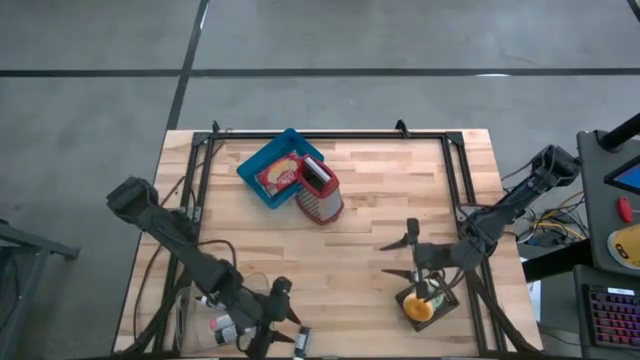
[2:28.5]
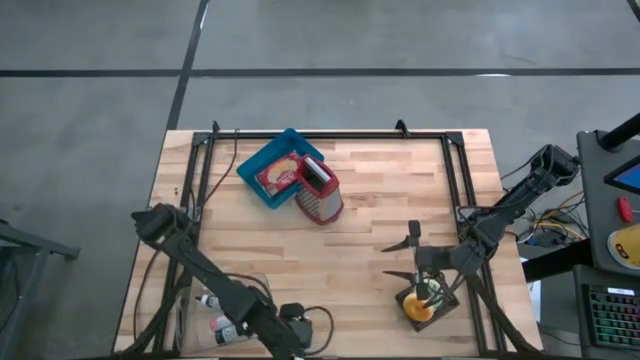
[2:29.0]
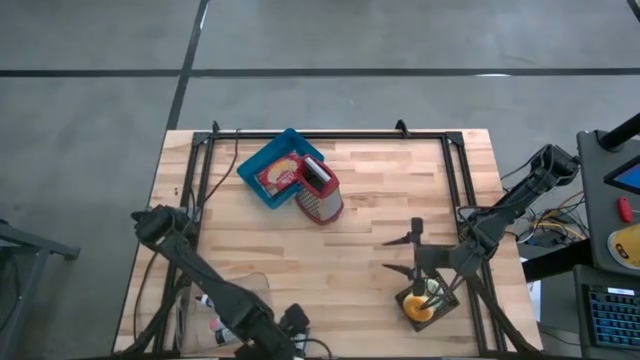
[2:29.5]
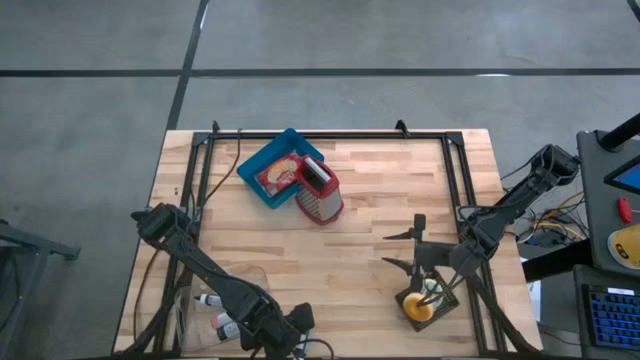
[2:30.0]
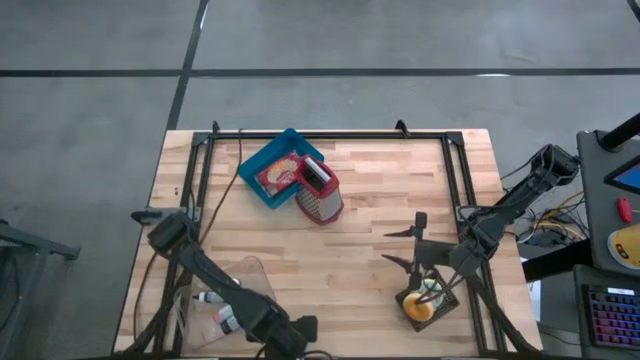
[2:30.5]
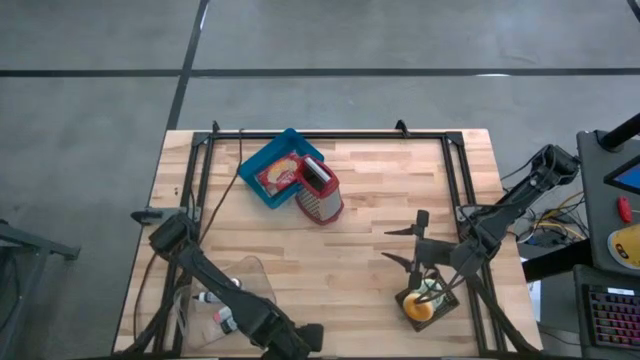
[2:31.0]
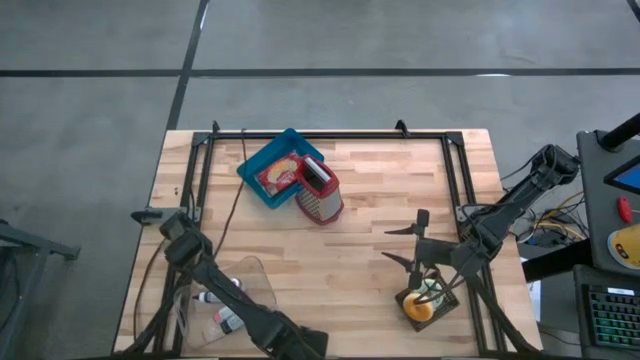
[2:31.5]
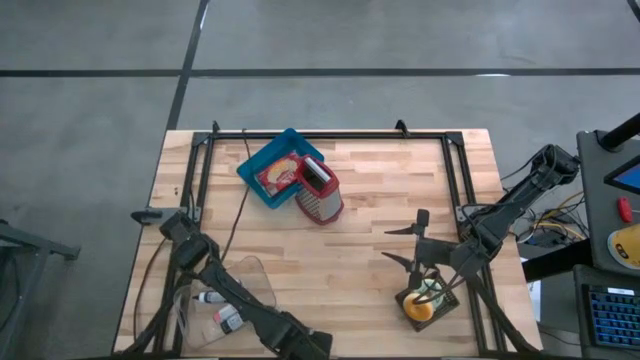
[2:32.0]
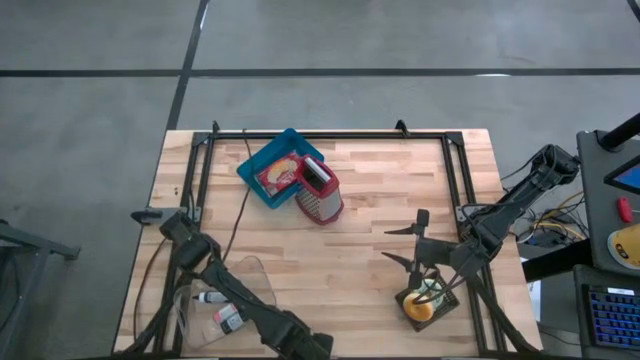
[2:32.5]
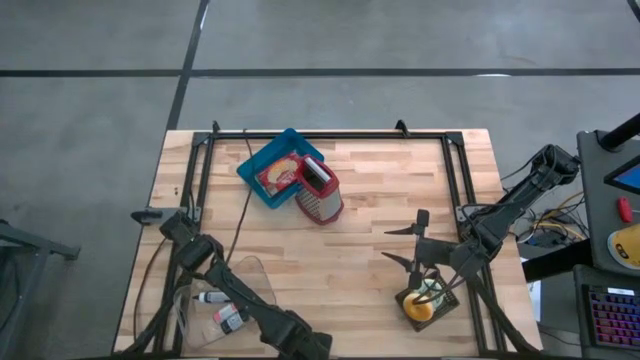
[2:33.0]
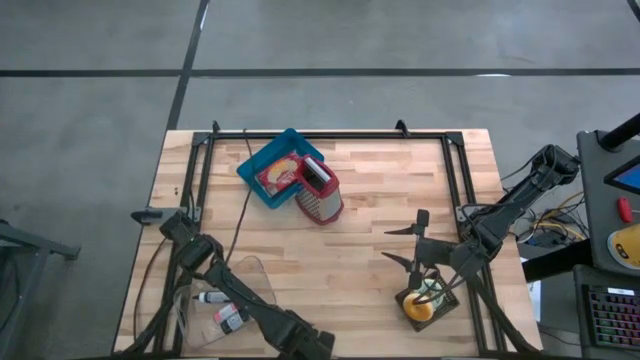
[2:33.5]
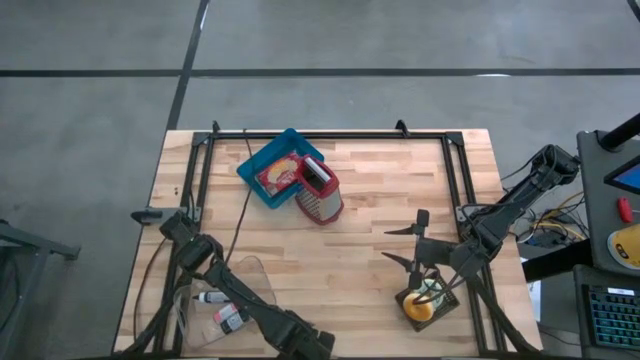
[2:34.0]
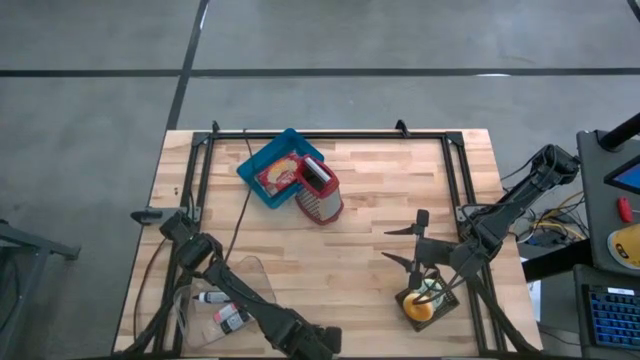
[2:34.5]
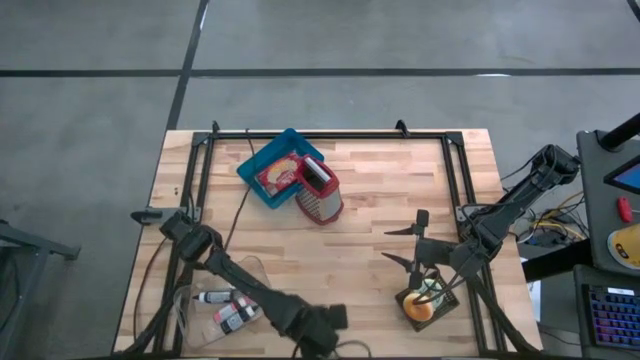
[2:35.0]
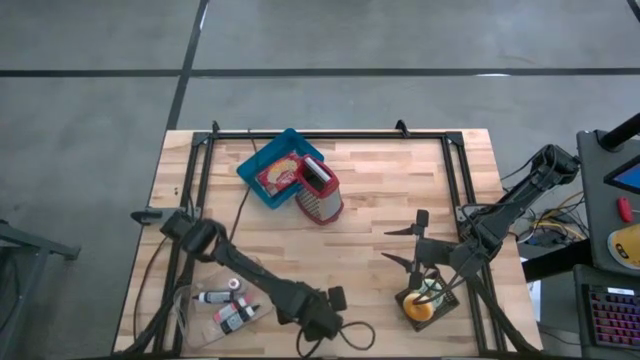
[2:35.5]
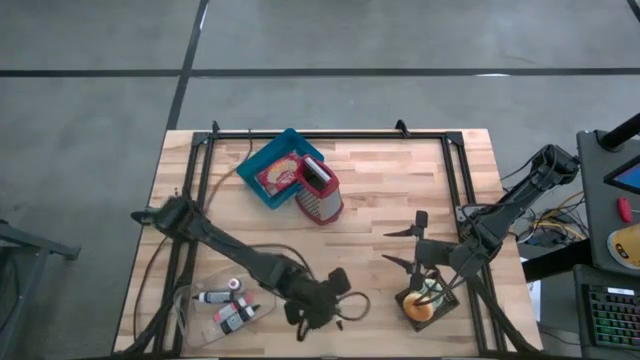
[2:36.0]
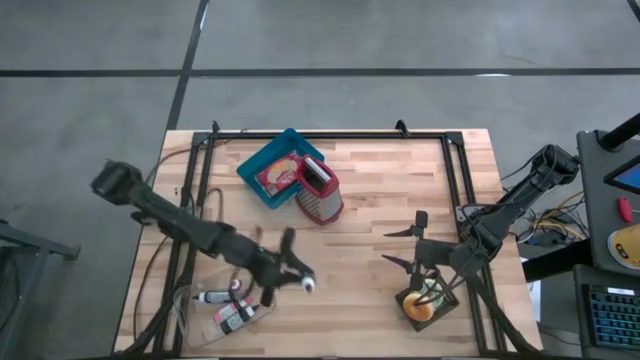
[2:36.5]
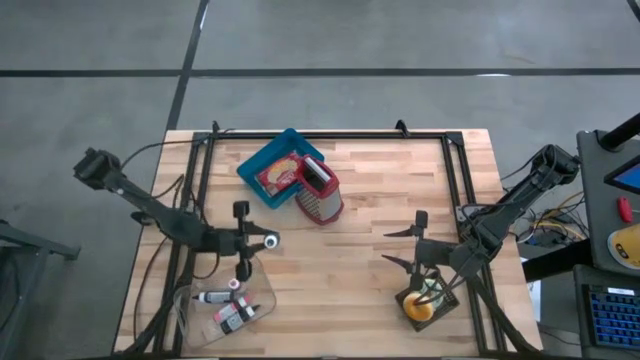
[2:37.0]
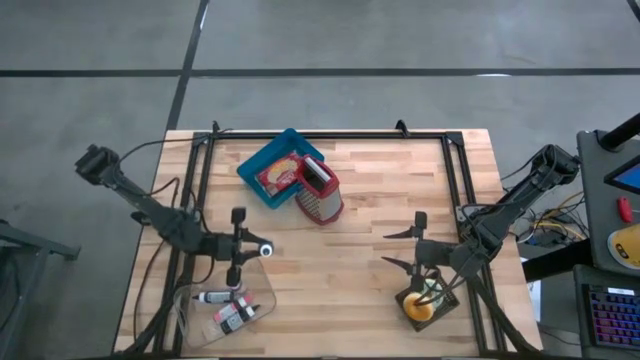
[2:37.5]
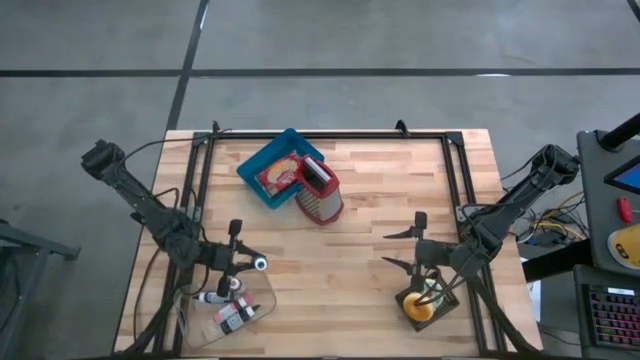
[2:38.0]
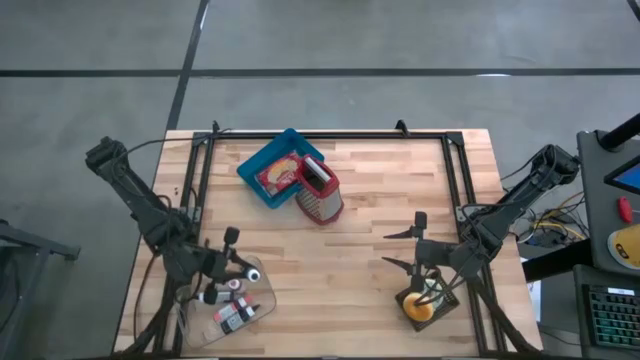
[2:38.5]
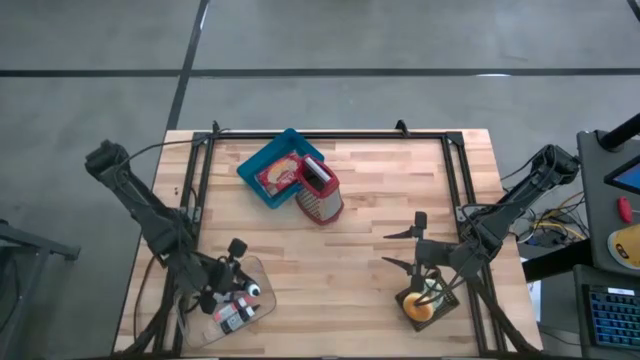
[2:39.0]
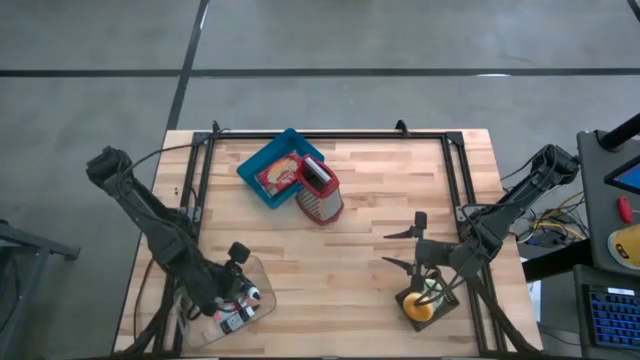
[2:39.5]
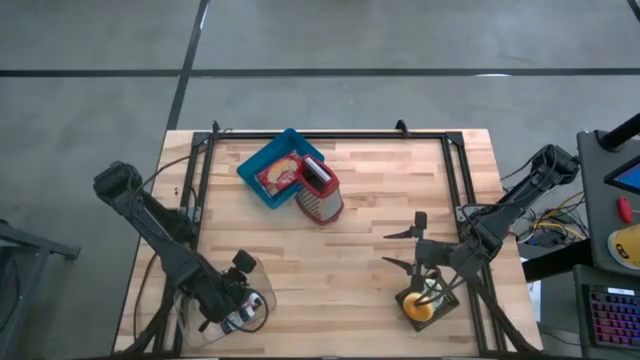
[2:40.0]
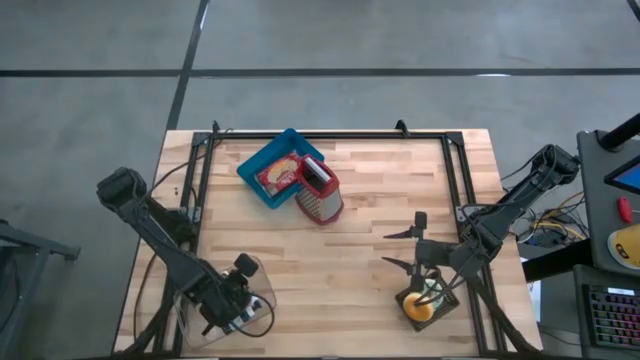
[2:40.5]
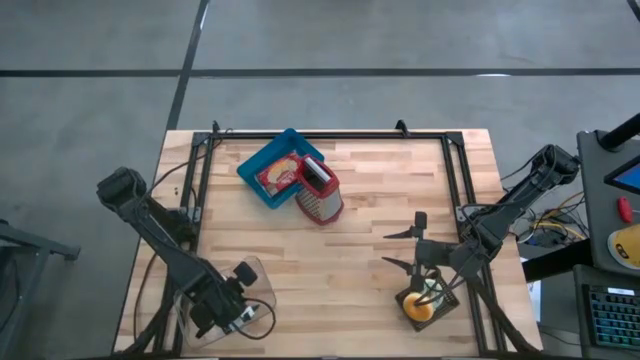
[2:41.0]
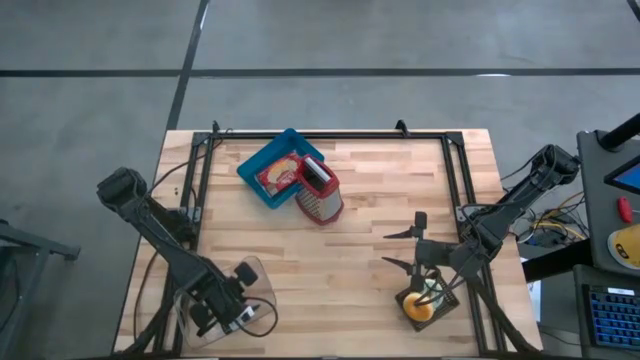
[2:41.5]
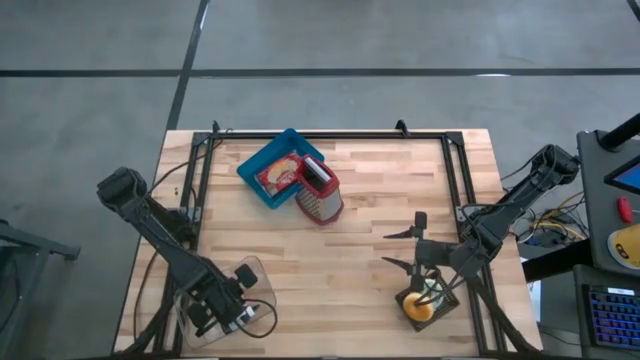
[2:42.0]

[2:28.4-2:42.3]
Put the black food coloring into the transparent bin
